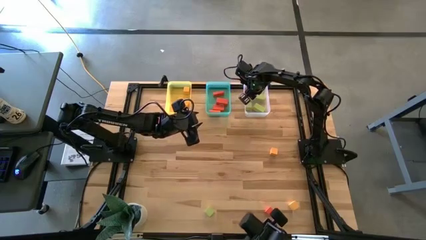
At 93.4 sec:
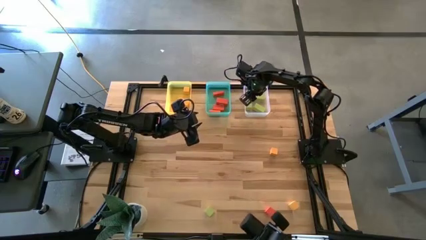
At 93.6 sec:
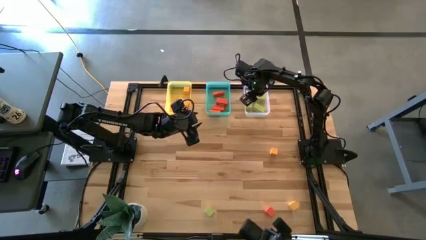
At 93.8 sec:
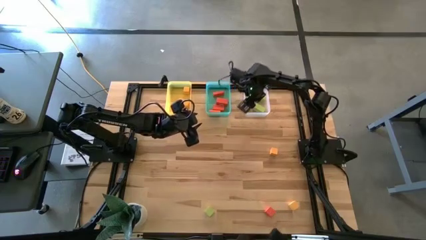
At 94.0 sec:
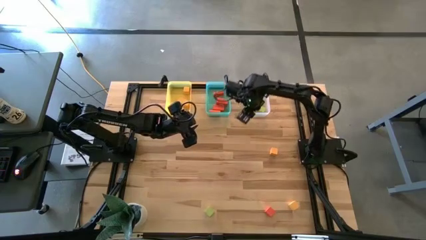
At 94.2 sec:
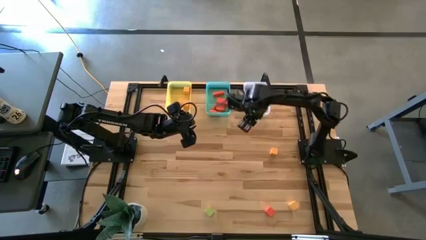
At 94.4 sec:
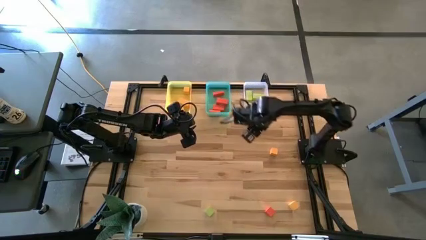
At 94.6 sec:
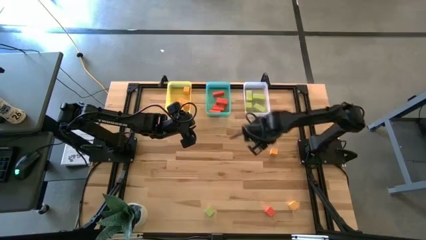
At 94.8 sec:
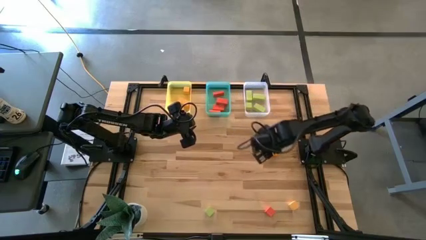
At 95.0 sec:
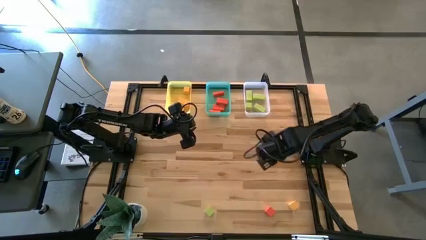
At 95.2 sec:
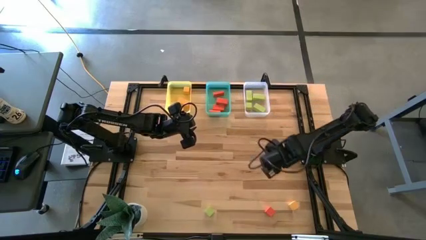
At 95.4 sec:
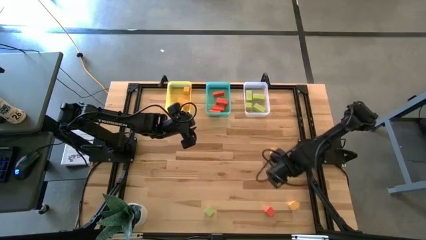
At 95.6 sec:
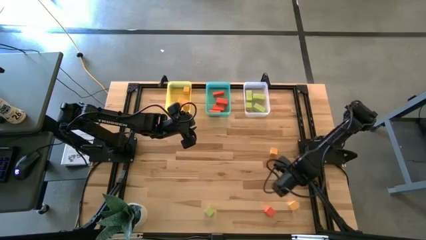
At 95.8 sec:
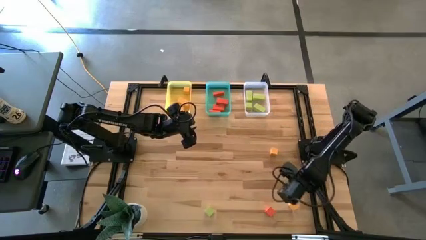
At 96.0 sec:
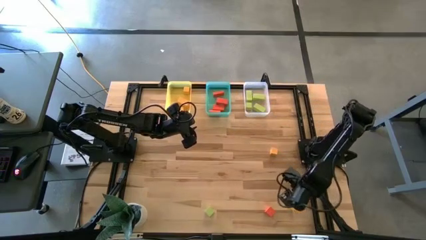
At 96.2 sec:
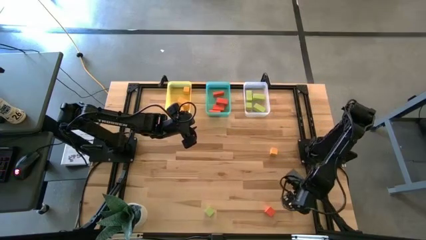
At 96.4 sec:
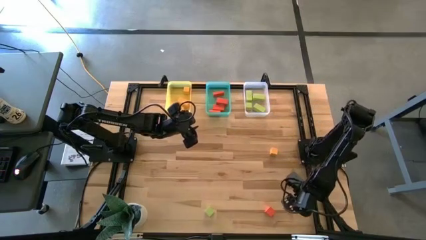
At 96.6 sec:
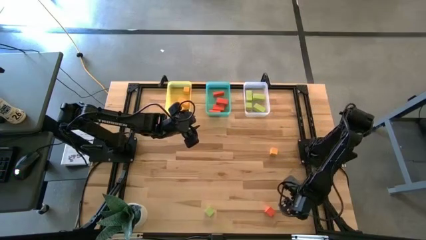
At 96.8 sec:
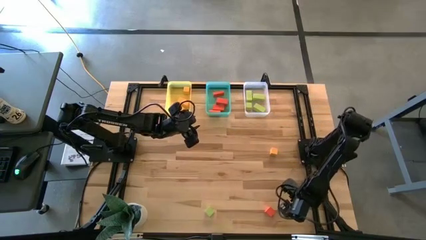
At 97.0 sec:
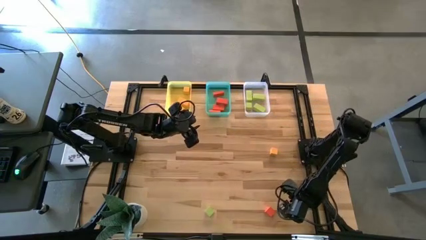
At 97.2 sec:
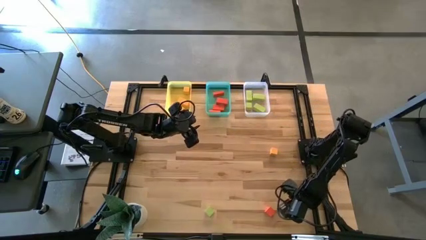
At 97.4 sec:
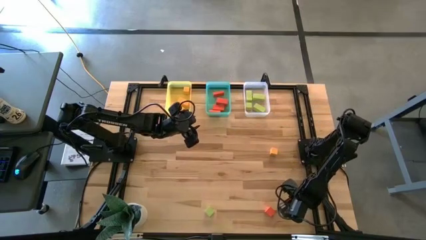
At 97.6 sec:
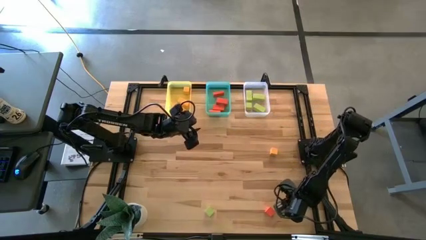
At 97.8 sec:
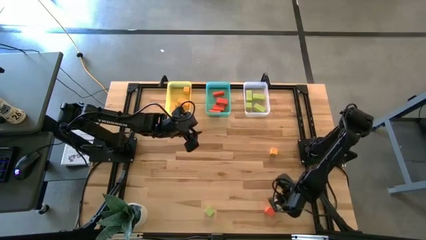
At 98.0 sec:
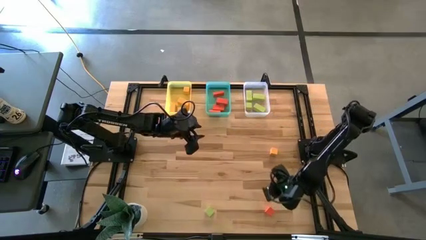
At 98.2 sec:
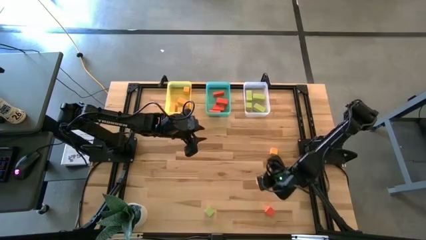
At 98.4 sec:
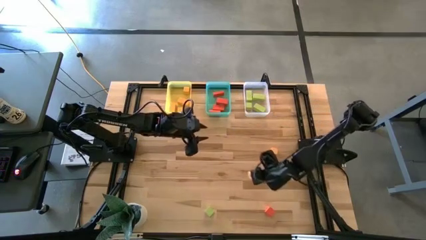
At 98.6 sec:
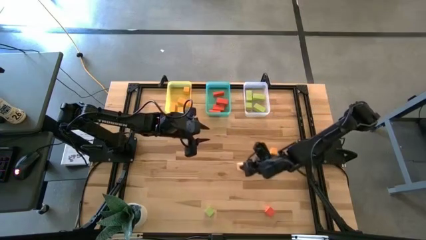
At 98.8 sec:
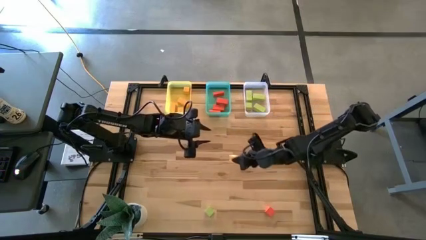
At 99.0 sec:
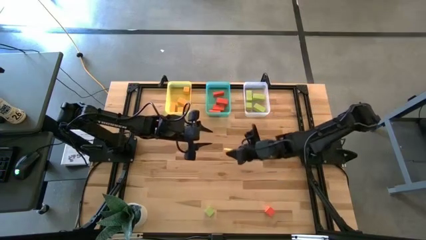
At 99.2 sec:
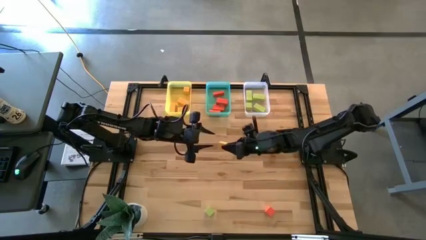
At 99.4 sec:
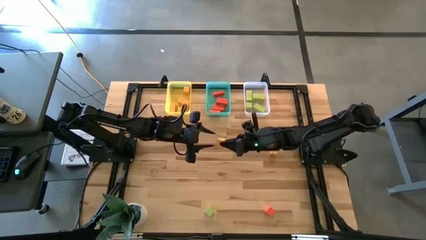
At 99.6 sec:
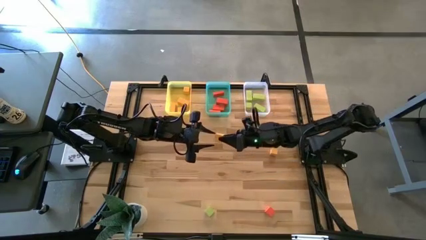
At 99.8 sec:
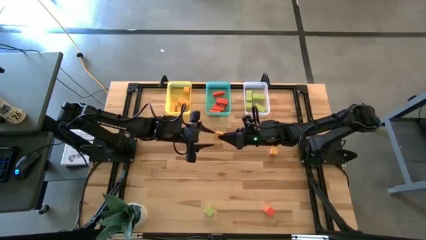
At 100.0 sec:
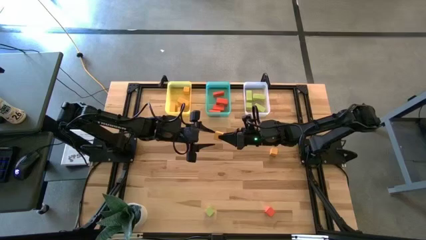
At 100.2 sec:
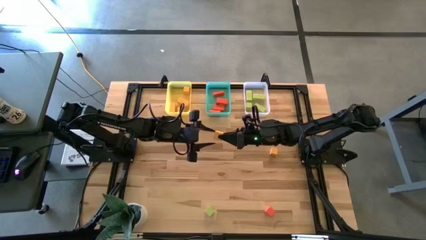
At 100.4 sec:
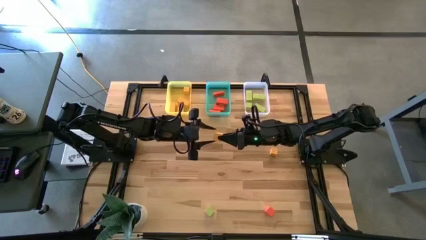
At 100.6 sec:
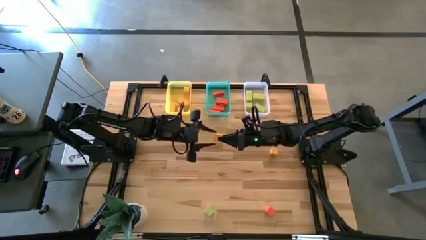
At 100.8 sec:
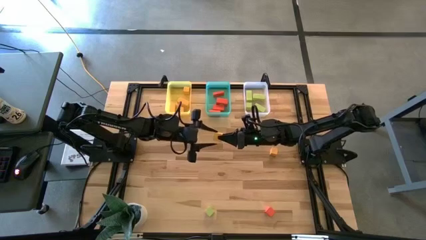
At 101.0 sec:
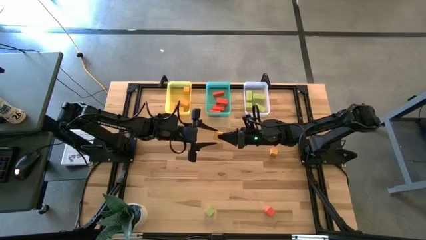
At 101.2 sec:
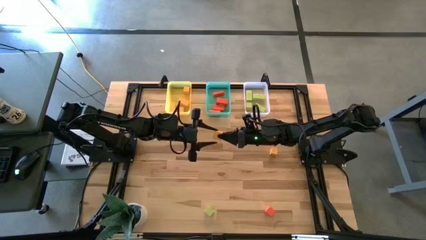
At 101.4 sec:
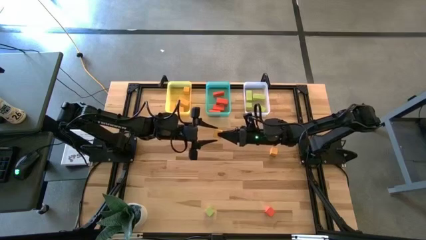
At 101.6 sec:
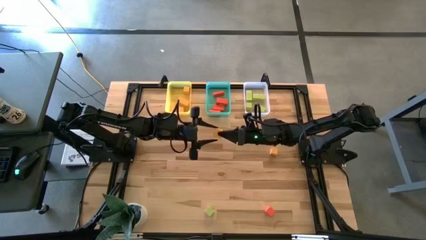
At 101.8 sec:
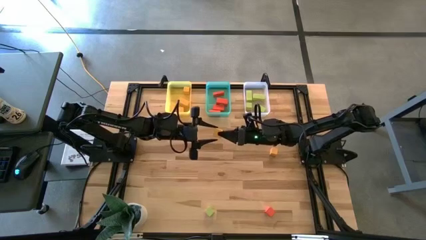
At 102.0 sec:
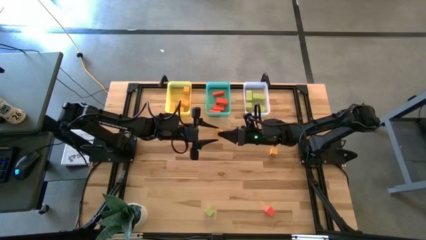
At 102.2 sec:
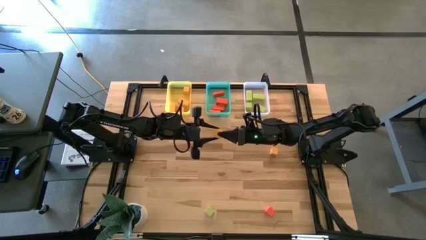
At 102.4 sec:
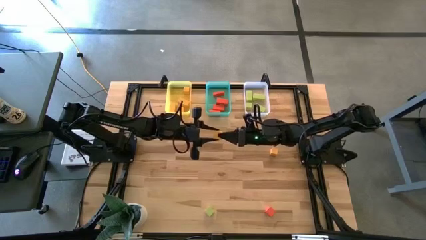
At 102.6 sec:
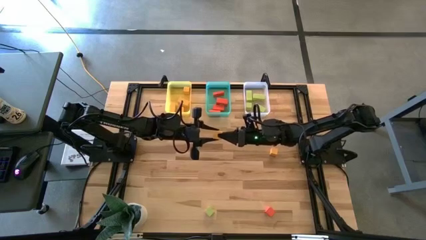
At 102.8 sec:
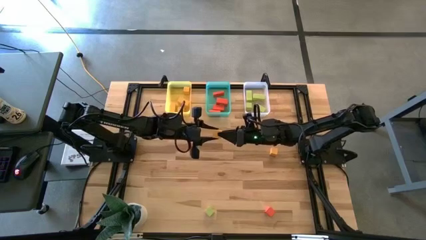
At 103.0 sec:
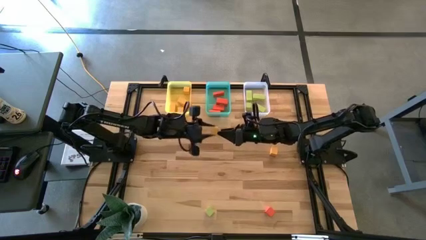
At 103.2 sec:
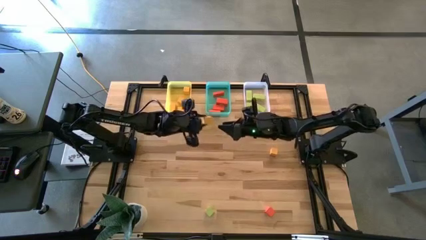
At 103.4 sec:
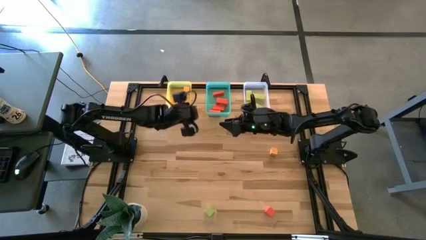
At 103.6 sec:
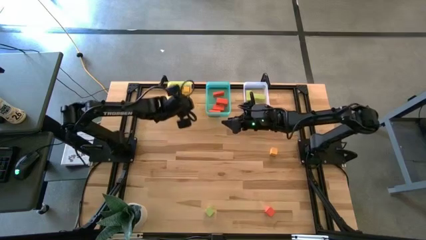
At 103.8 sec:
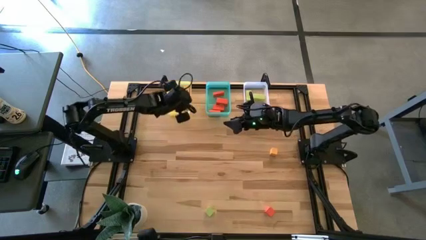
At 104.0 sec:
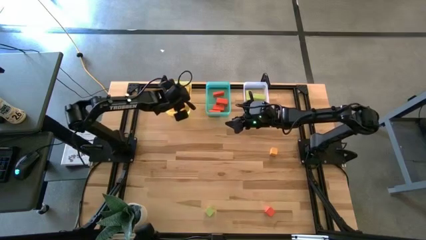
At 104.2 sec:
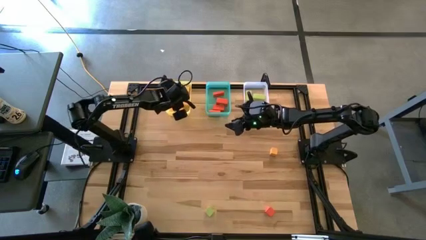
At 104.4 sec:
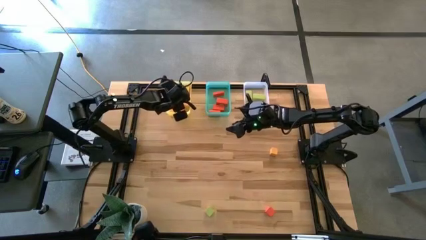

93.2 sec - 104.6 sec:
Task: Sort & place blocks by color
Put the yellow block into the yellow bin

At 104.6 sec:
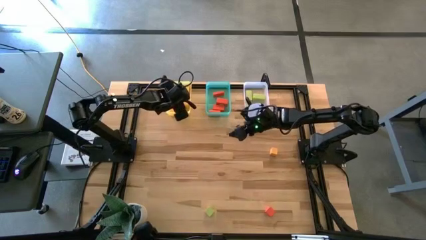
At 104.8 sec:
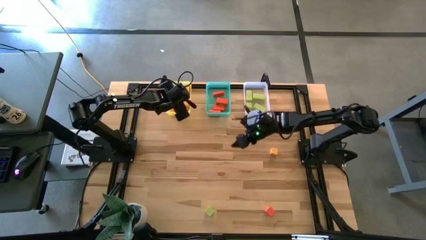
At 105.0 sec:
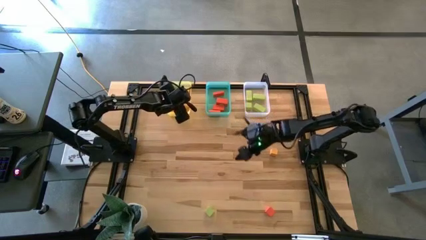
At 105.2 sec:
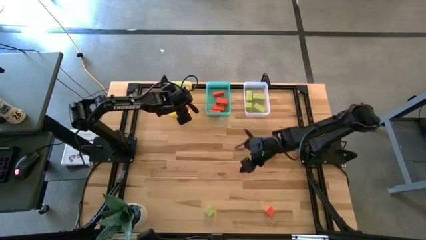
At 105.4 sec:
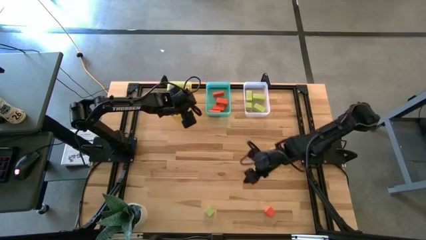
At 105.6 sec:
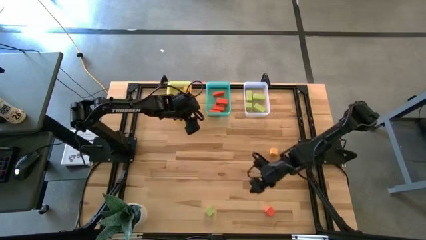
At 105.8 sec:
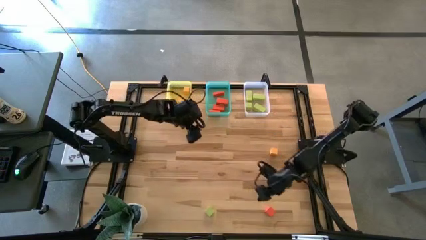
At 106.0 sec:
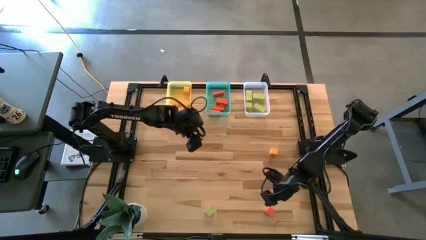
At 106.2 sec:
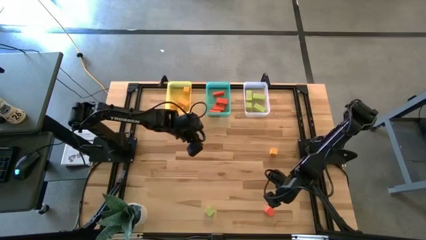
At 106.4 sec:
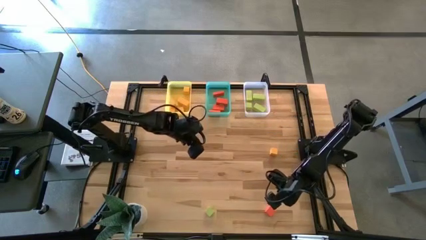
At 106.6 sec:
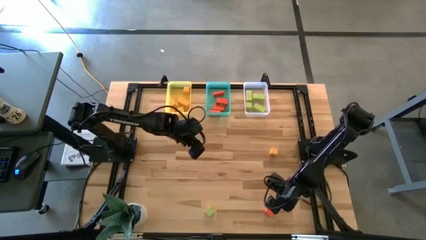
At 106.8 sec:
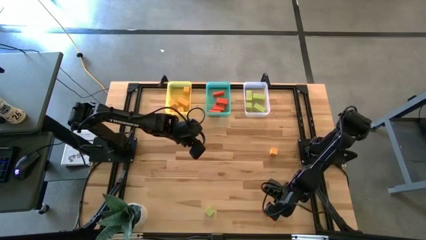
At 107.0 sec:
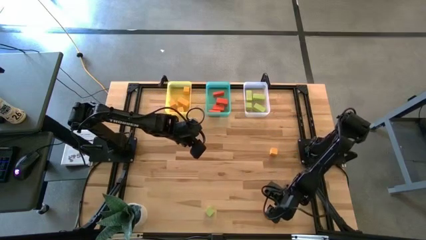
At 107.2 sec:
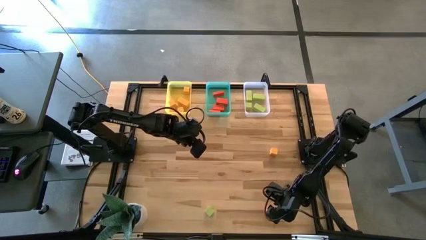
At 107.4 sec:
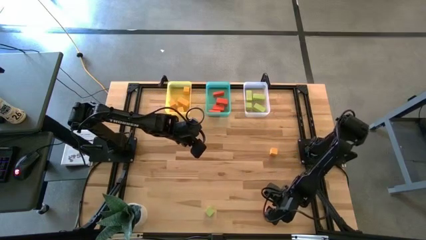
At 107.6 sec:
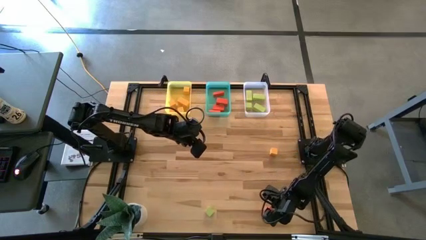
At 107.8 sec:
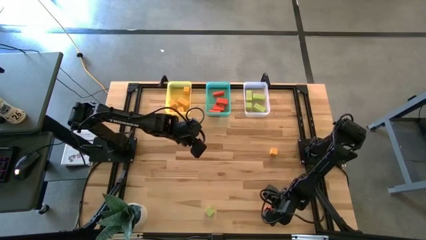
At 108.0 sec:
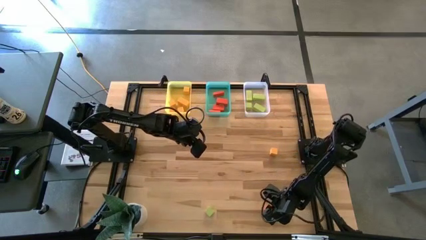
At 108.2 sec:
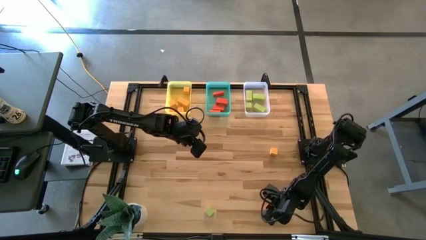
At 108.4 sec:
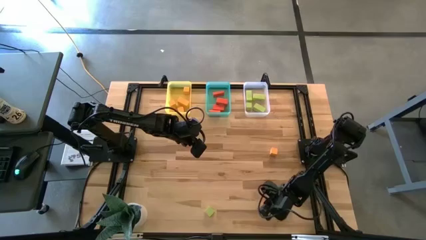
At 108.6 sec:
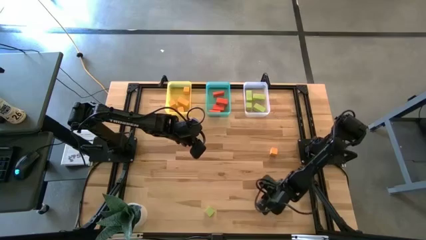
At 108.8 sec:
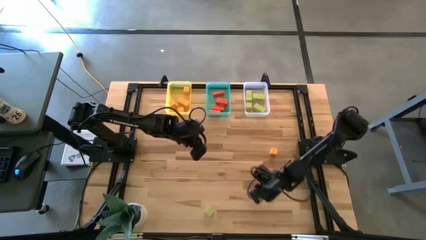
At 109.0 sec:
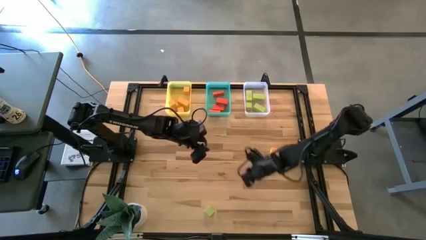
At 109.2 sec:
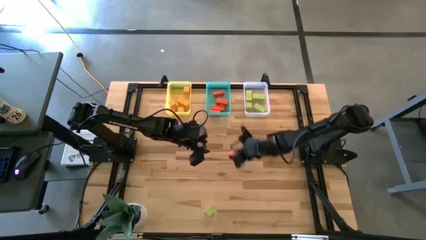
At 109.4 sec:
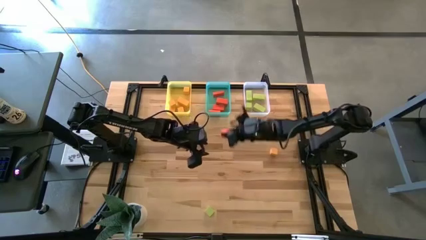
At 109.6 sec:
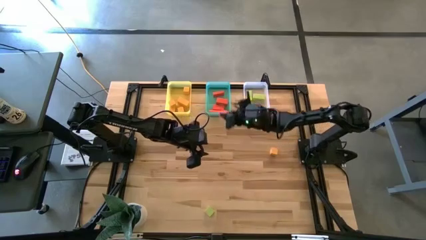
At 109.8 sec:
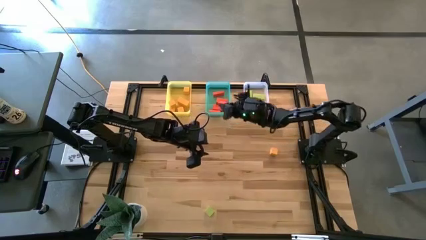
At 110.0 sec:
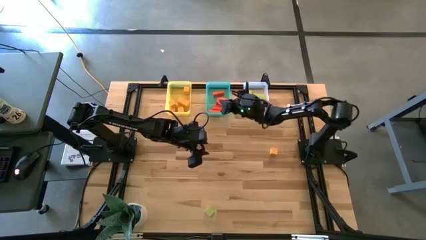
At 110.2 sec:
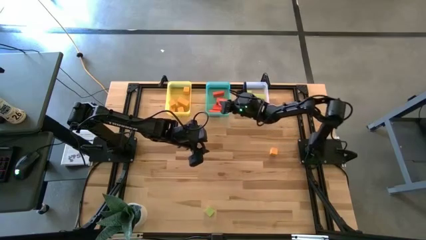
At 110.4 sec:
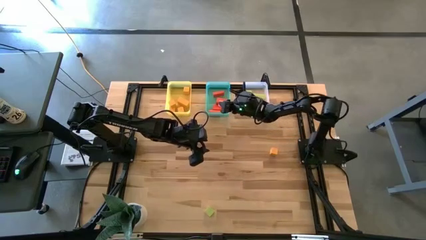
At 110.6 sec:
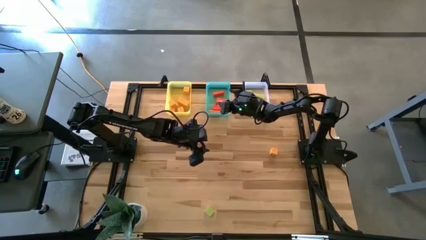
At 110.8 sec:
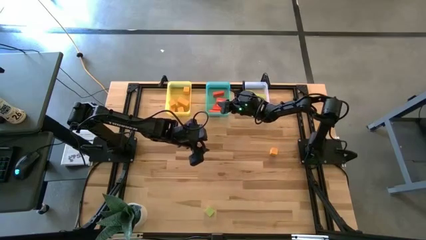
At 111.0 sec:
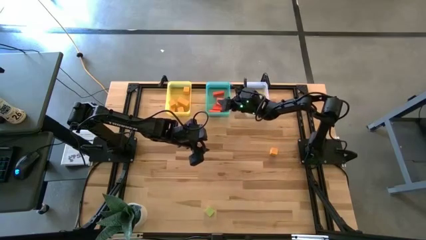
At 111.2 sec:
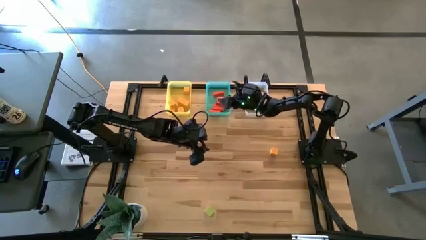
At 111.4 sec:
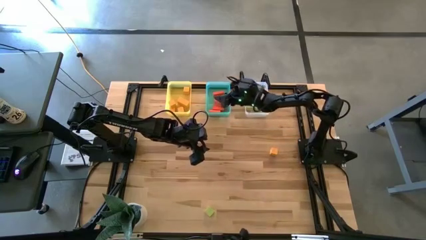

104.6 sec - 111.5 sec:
Put the orange block into the green bin
